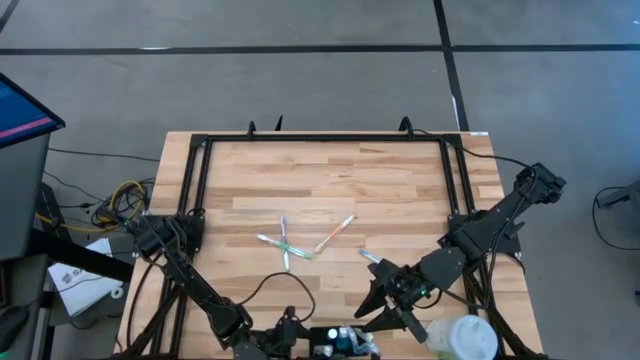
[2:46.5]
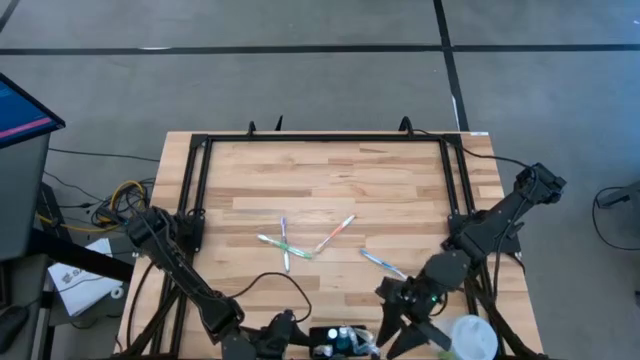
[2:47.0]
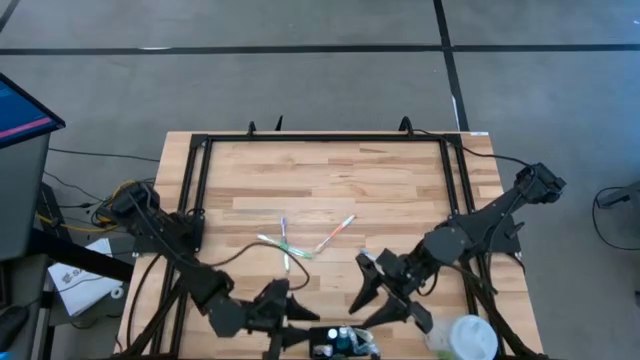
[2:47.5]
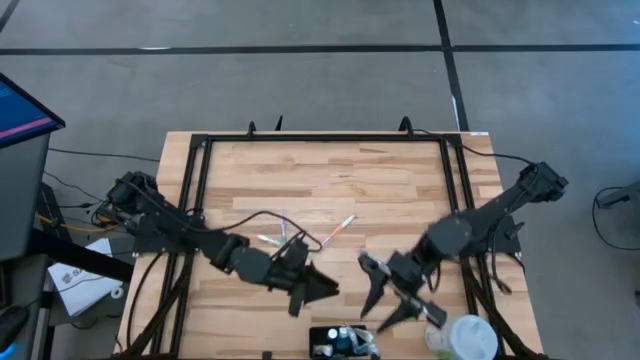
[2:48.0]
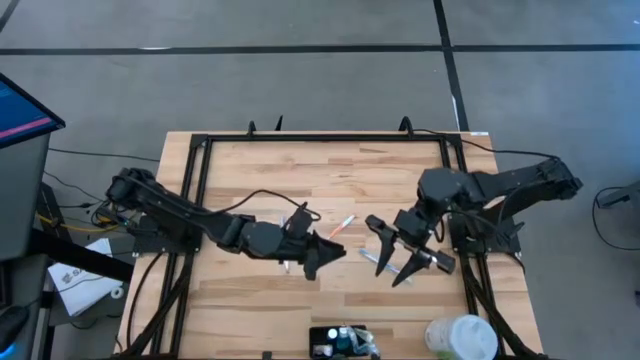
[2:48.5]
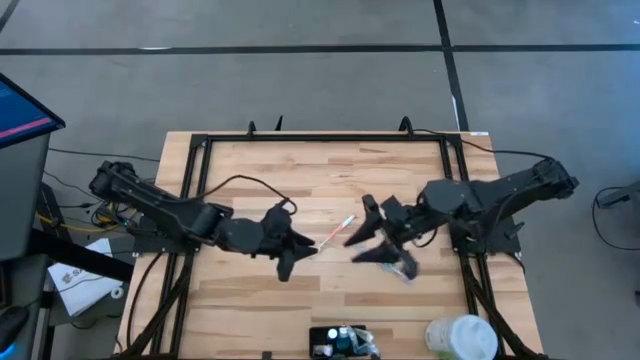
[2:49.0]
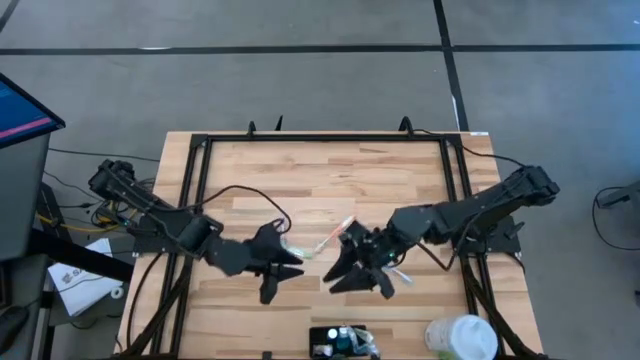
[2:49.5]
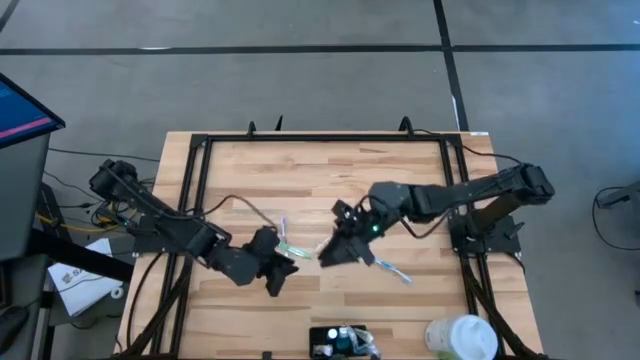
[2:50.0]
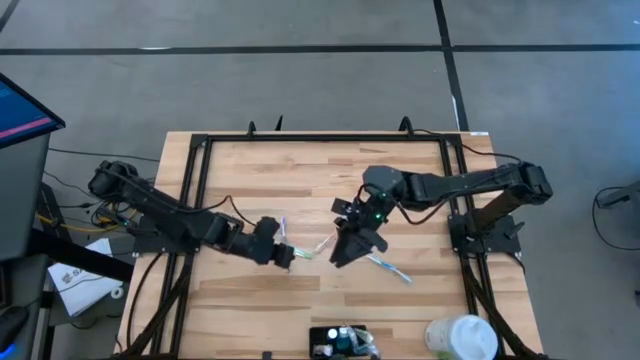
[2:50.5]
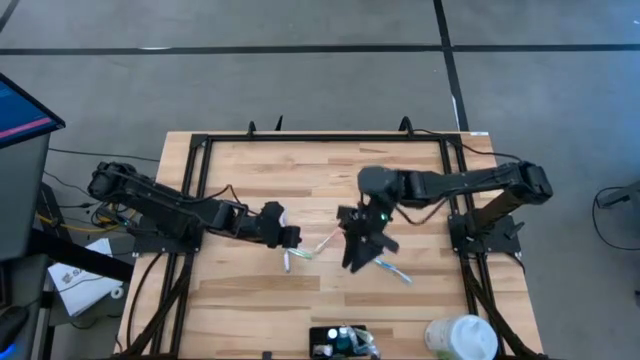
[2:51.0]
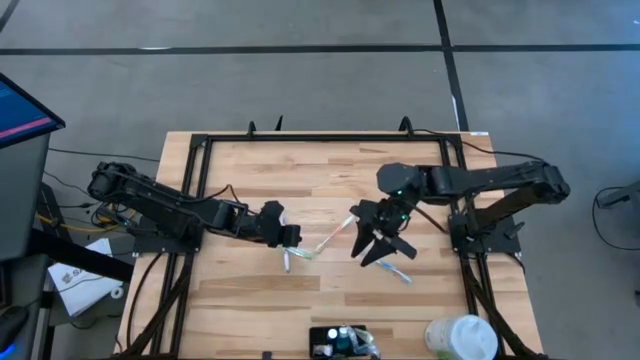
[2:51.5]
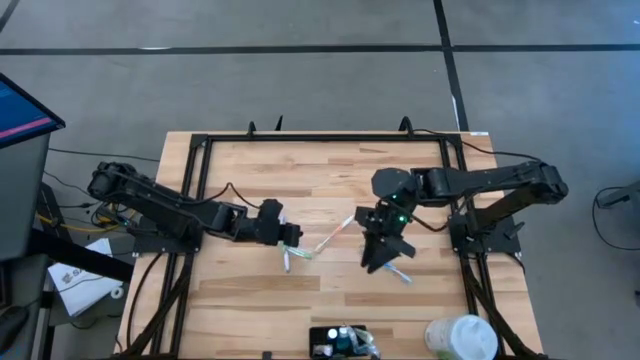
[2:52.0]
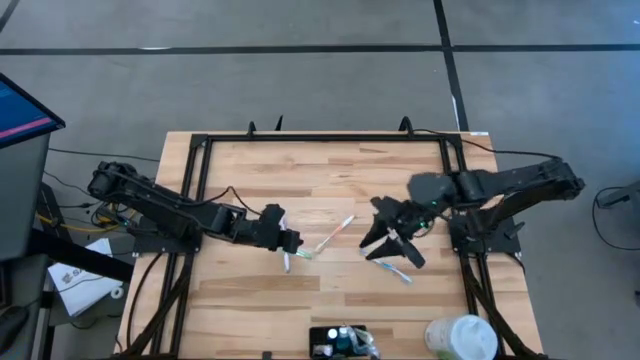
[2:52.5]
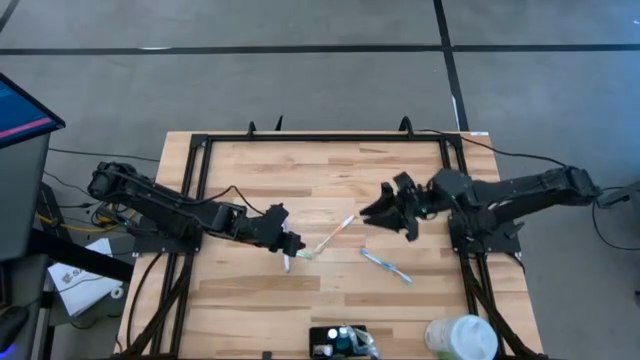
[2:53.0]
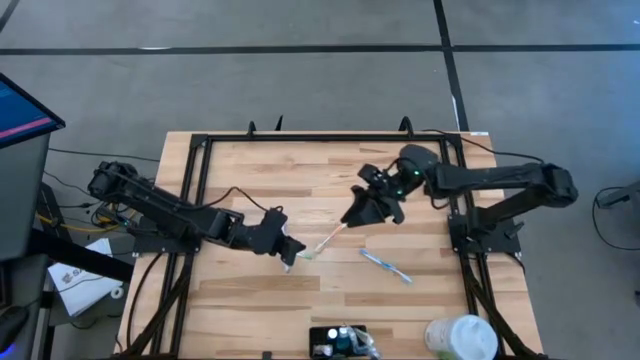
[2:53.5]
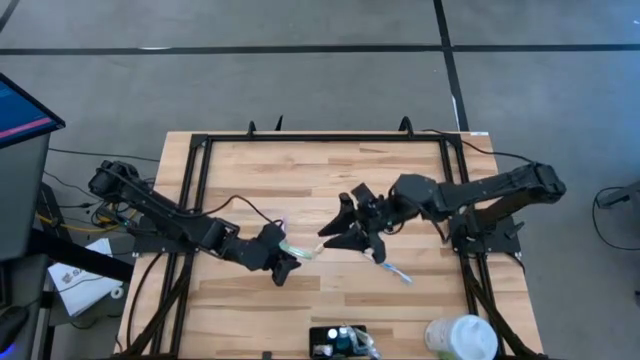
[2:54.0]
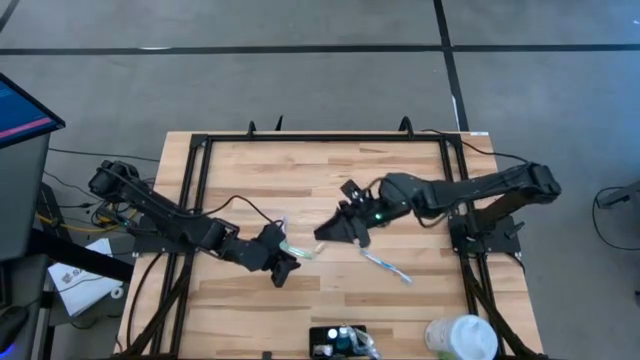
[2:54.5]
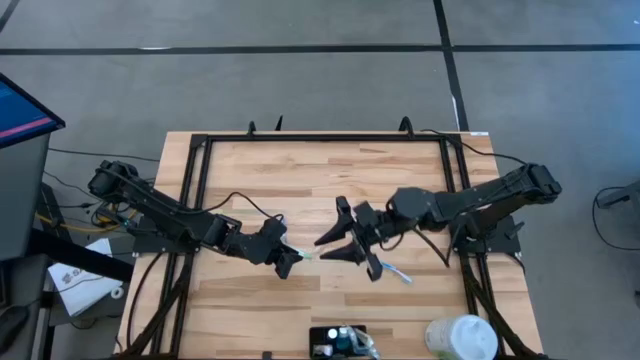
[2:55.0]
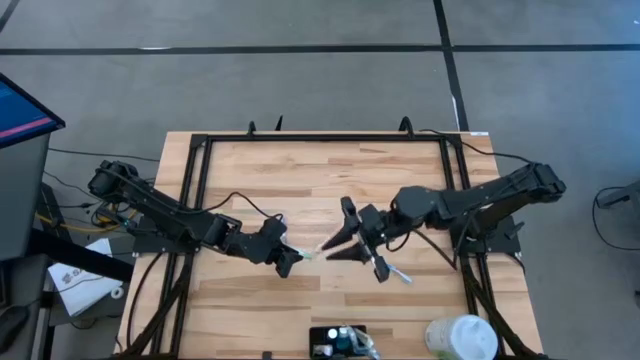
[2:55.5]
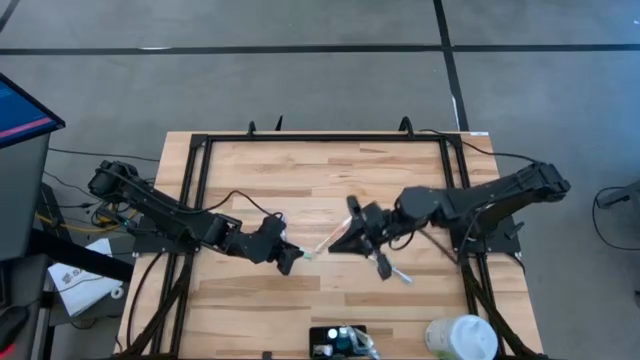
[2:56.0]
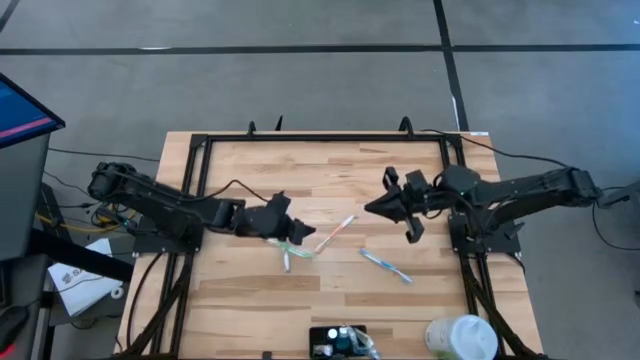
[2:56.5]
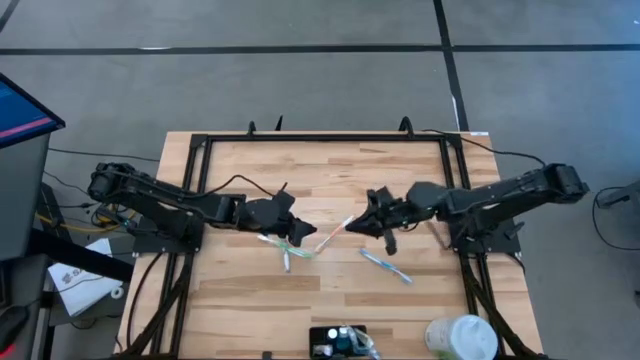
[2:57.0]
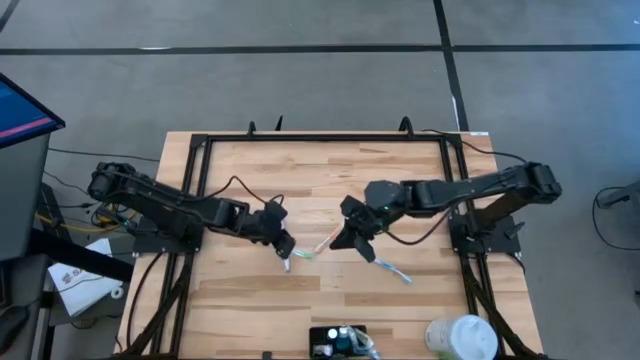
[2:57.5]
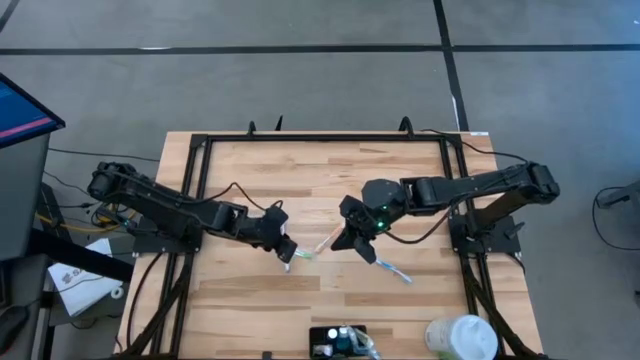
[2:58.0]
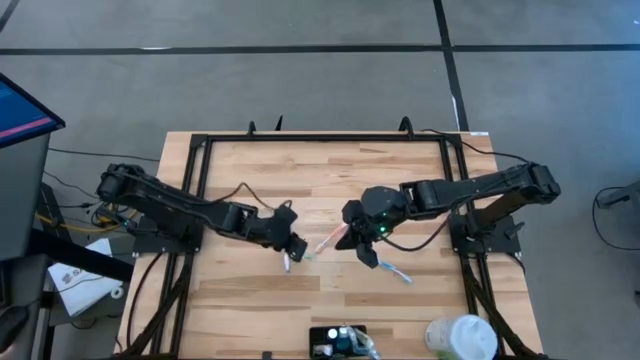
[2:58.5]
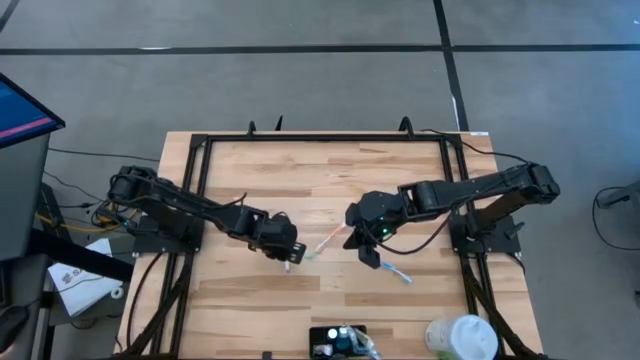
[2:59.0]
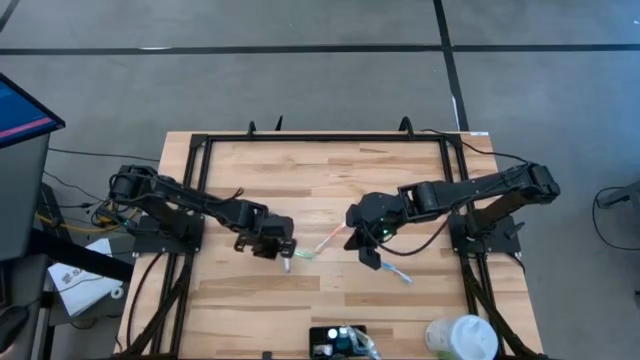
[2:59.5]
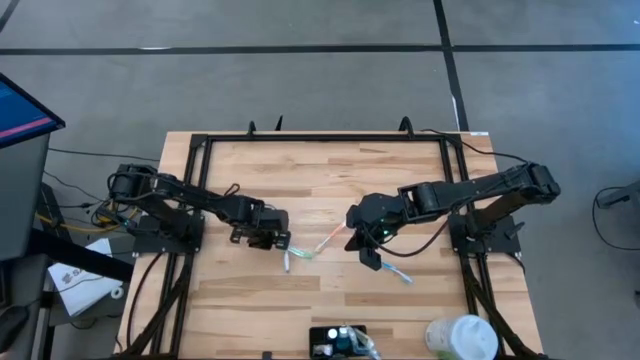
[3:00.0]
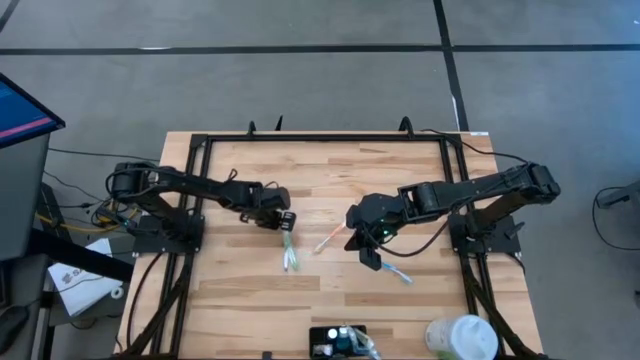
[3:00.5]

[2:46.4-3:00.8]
Task: Pick & Place toothbrushing station
Put the orange toothbrush into the black mesh organizer

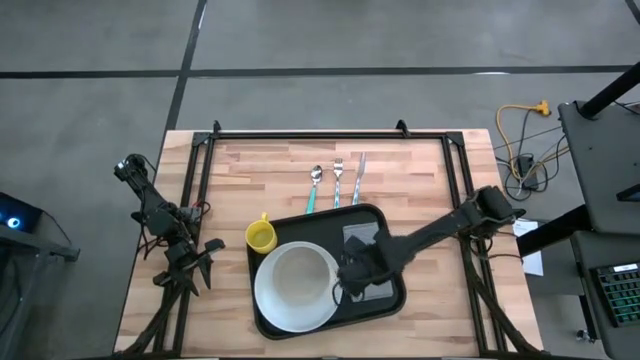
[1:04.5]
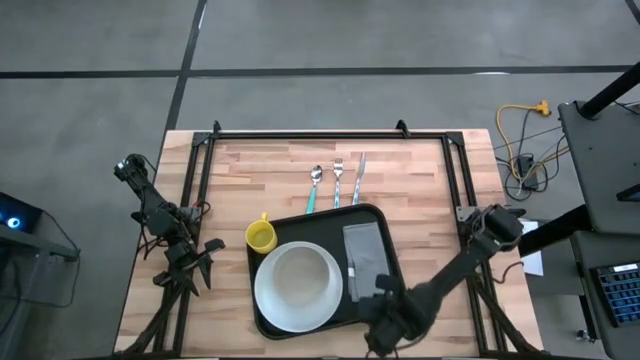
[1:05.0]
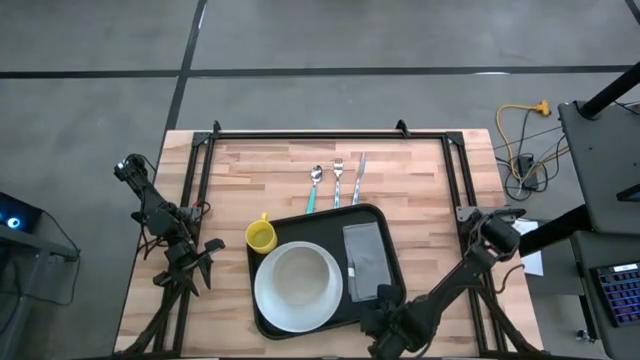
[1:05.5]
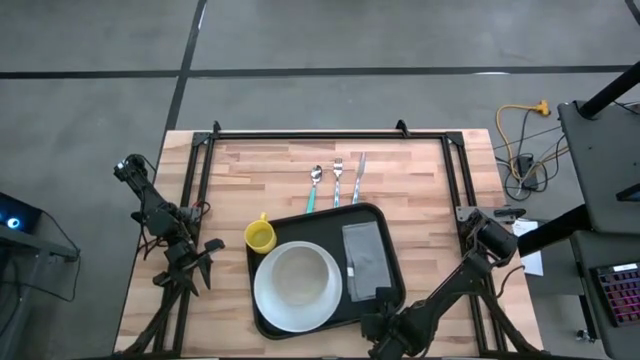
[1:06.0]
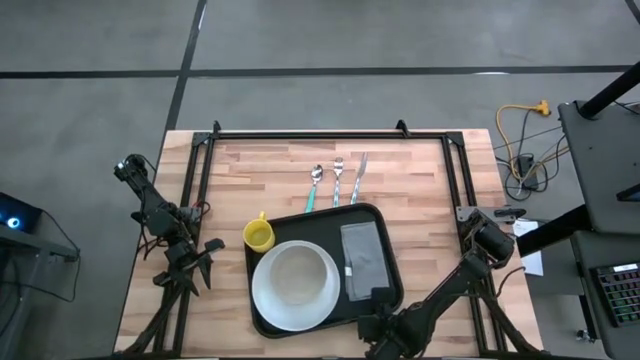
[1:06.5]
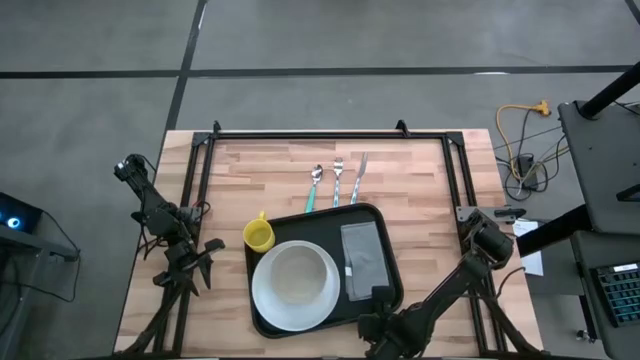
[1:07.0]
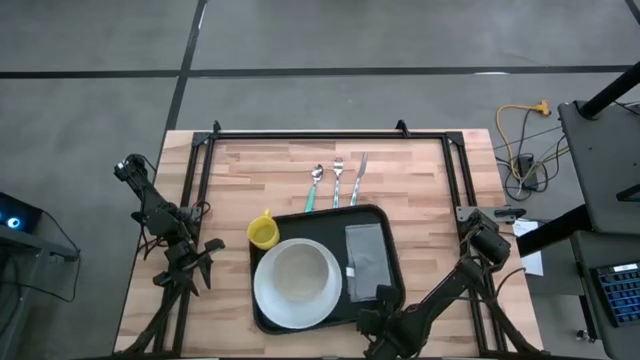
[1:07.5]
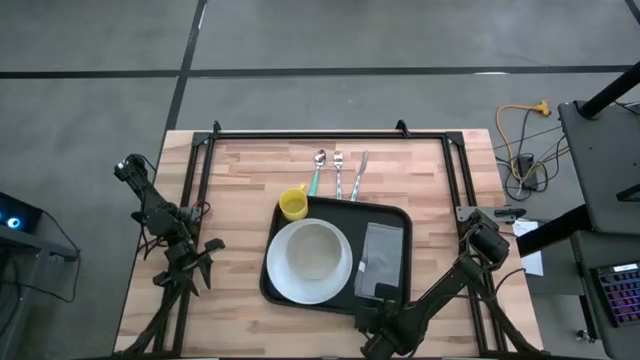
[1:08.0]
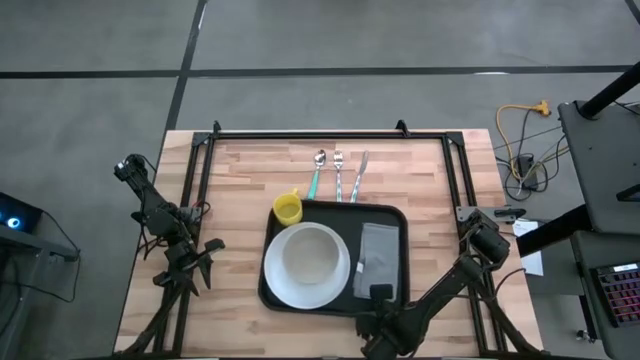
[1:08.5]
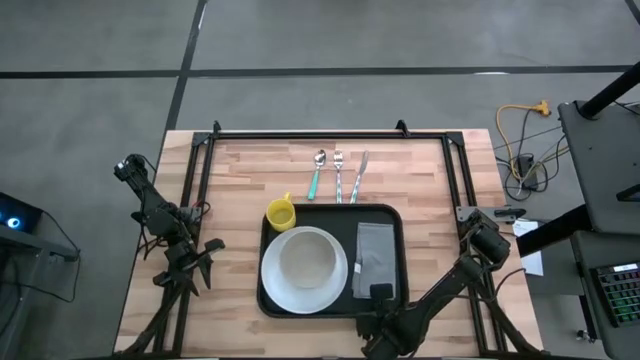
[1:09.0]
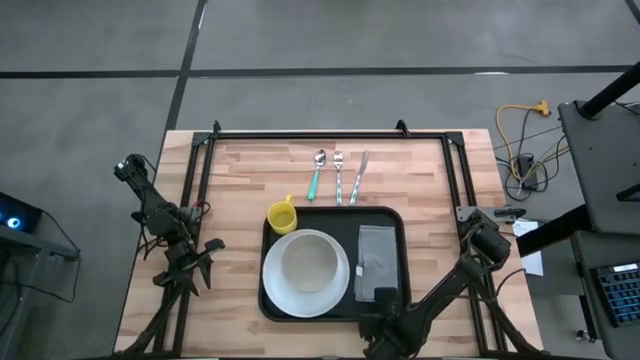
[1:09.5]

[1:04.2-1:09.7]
Task: Set up tray
Adjust the black serving tray
